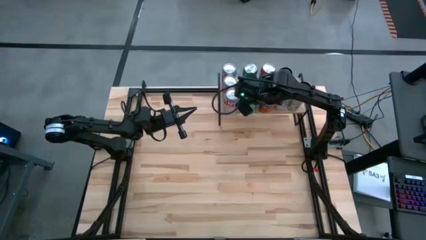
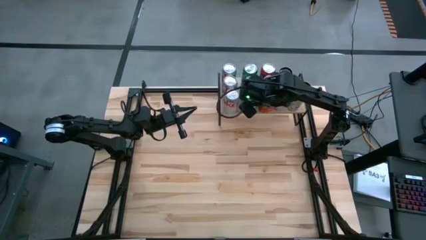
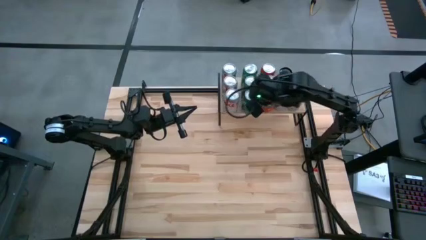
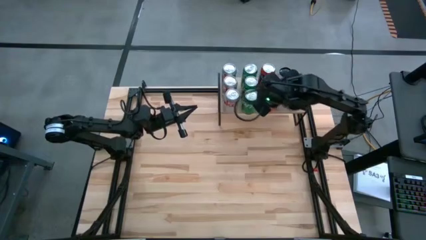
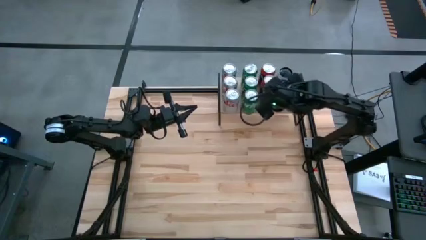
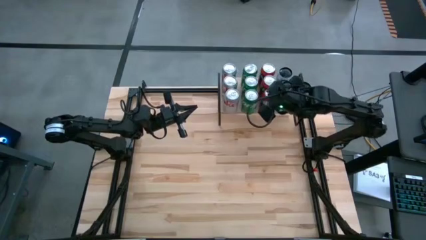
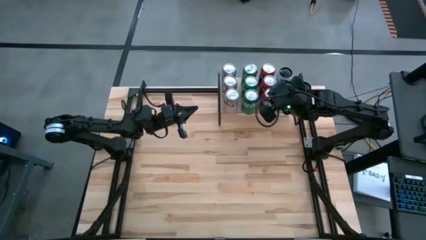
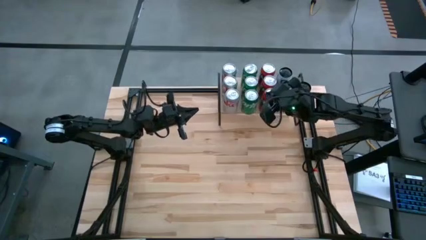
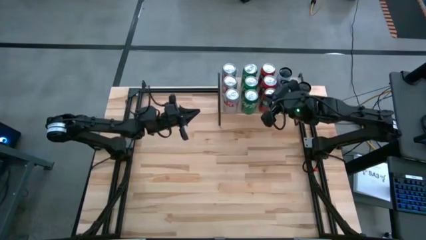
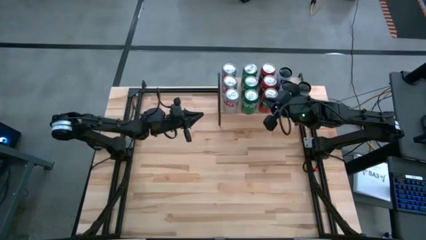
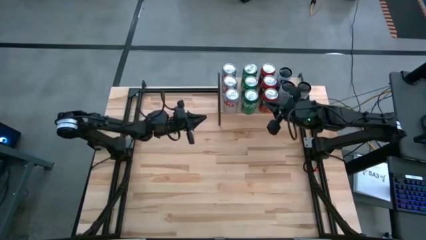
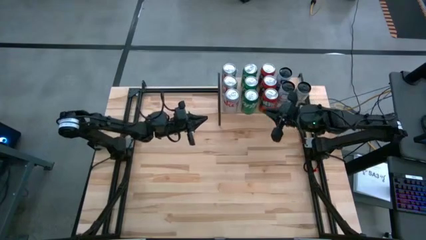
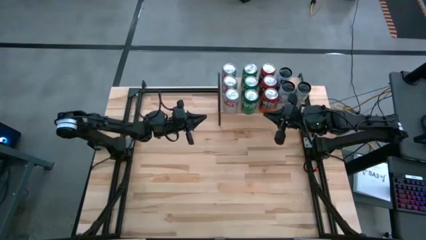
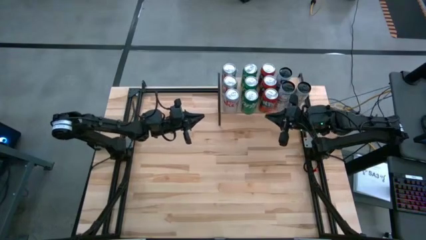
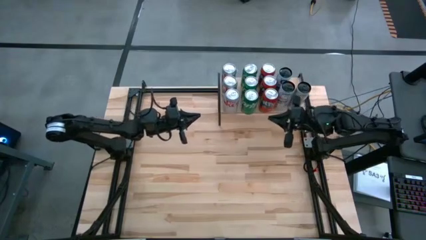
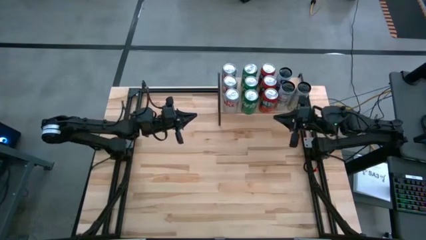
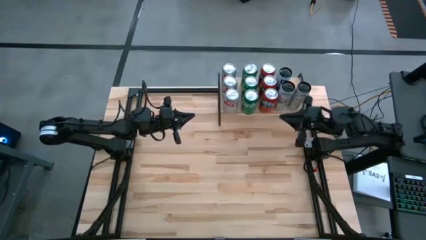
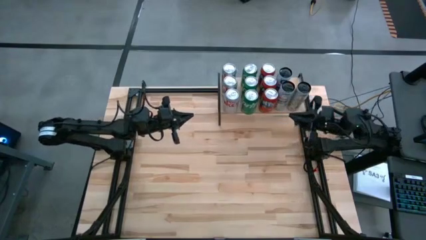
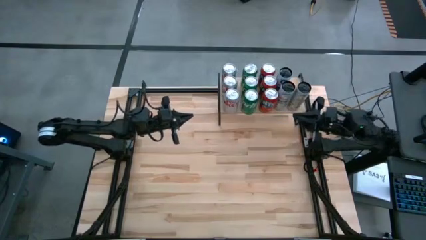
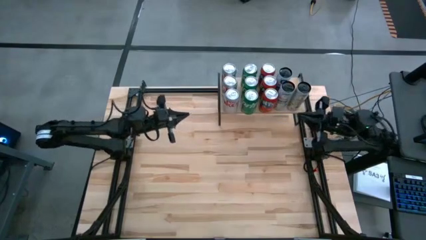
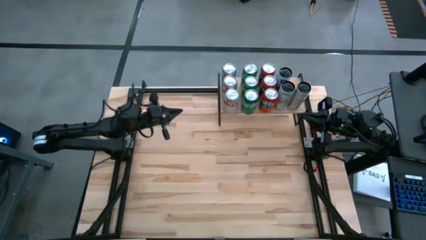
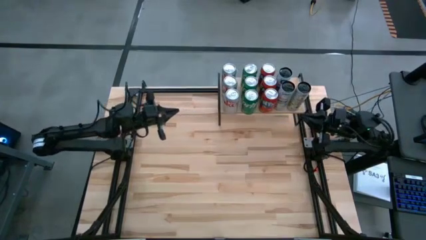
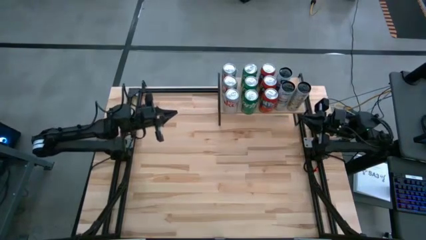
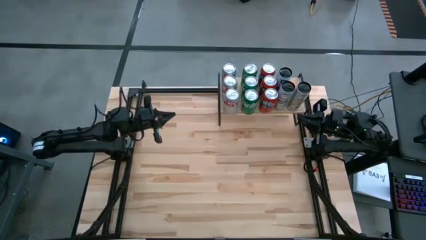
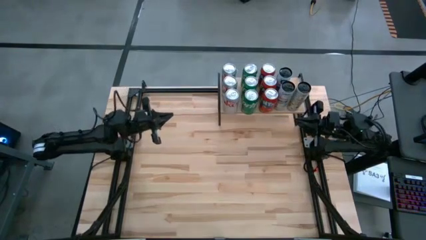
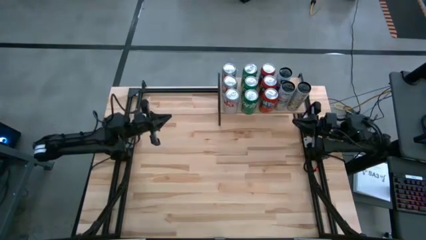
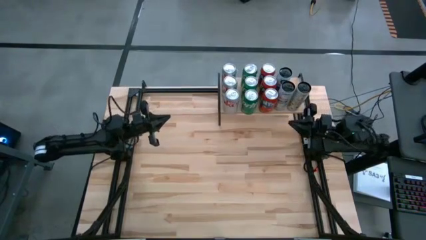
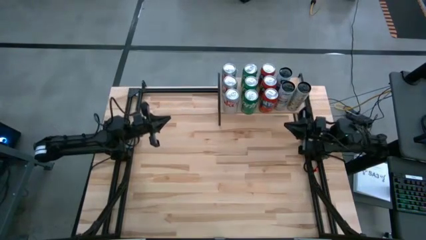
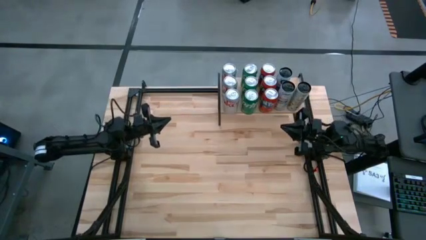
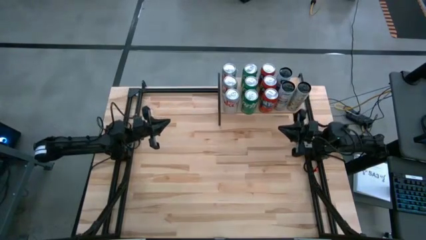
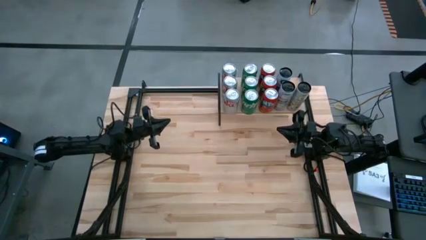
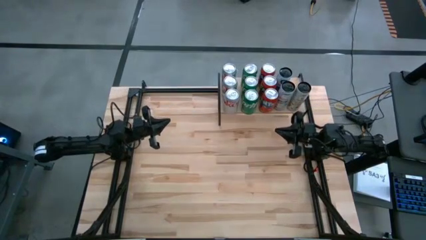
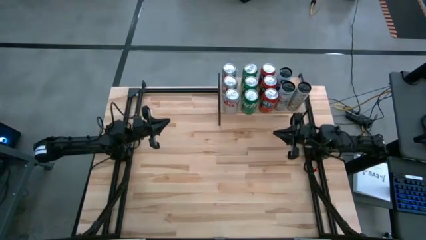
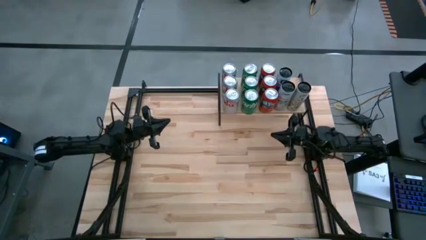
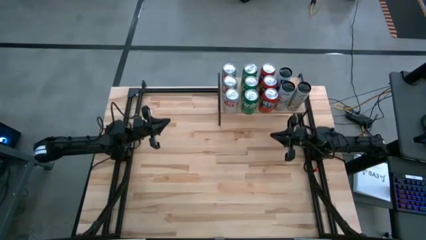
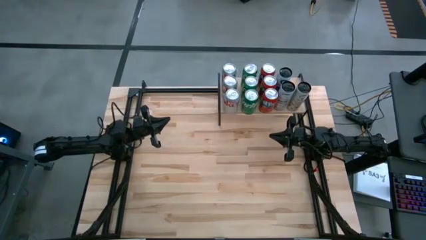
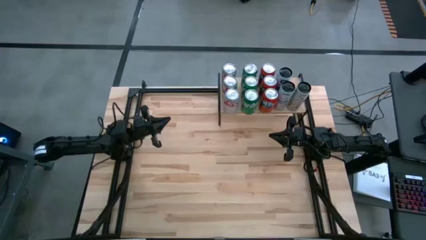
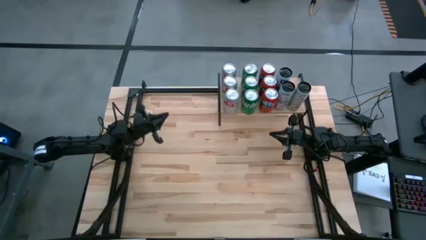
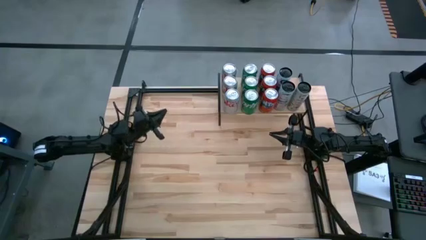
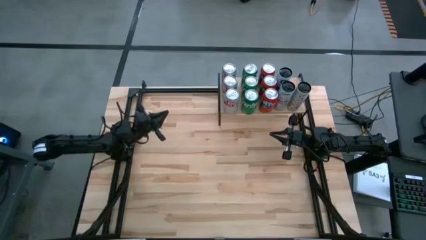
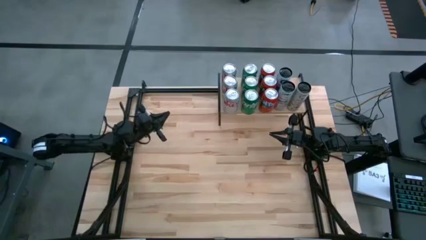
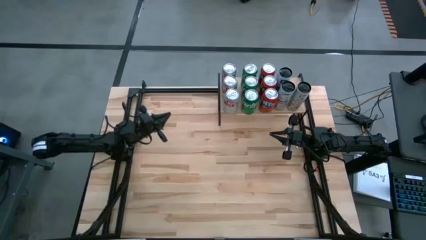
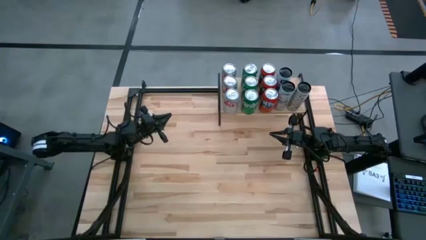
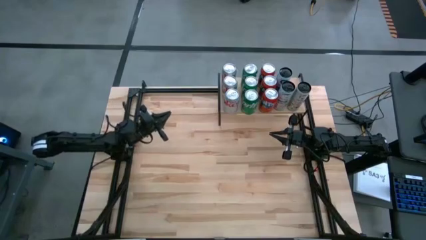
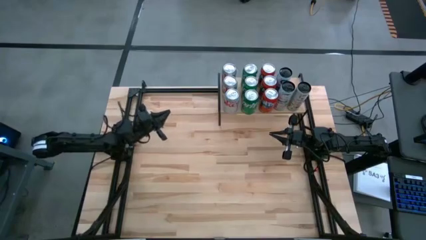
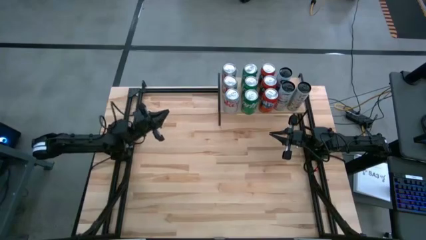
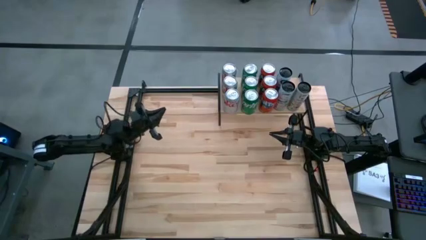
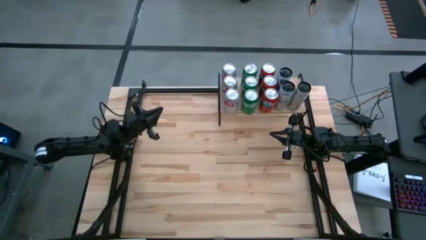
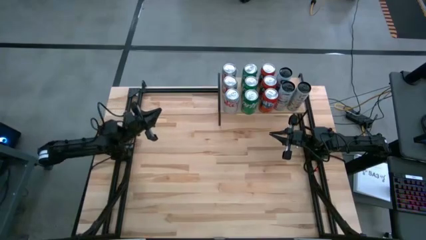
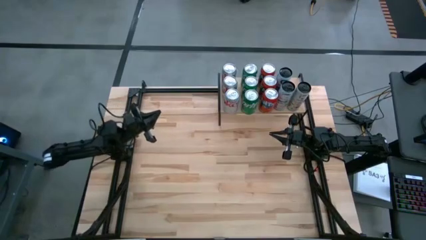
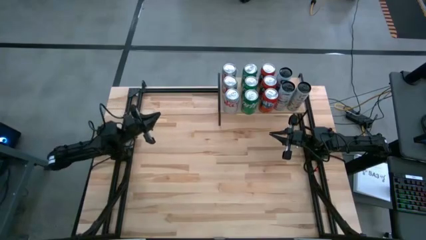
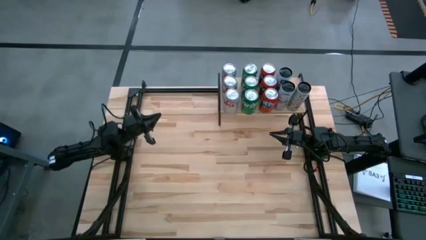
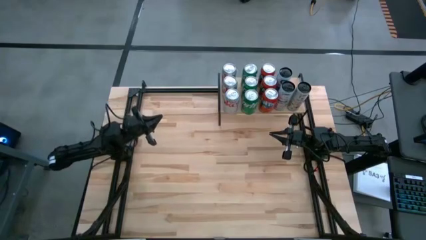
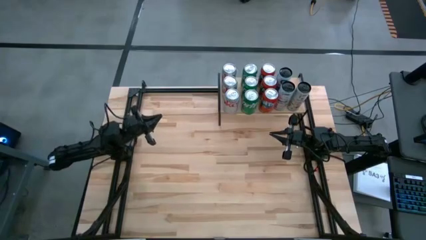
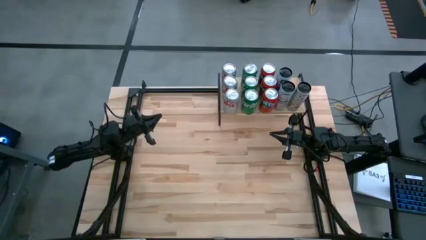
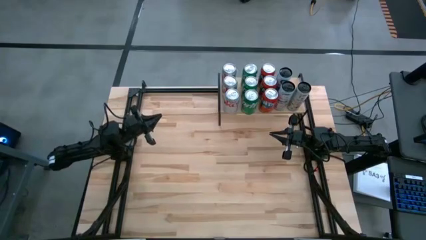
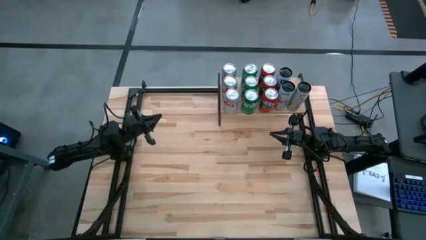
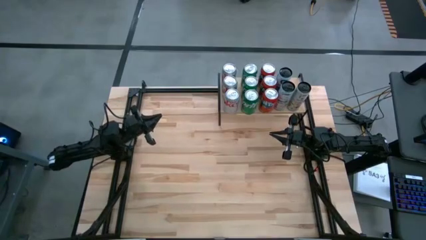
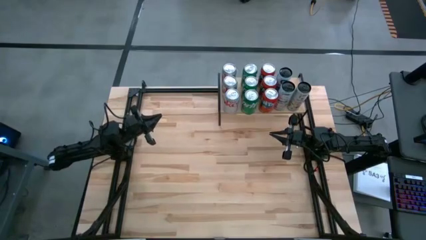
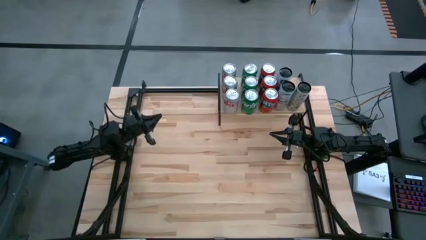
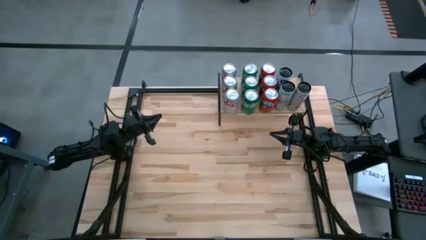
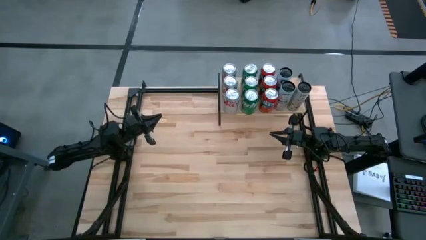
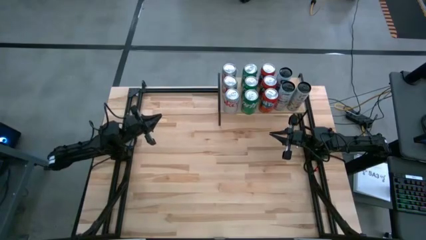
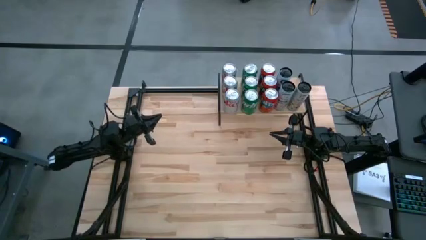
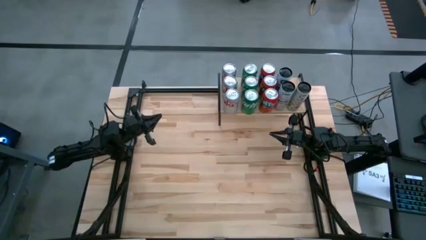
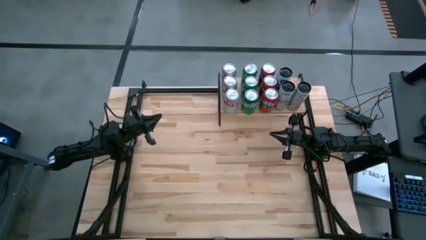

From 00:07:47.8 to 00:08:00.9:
Task: Place canned beverage on shelf
Return to Home Position
